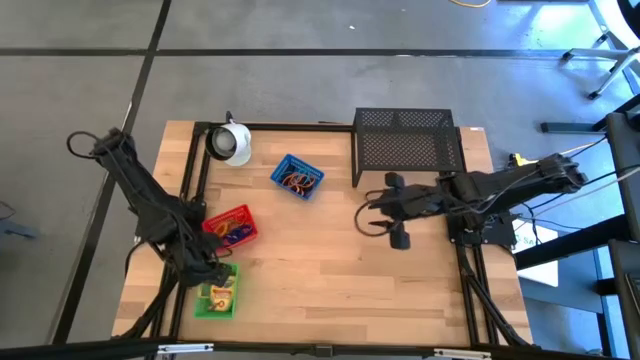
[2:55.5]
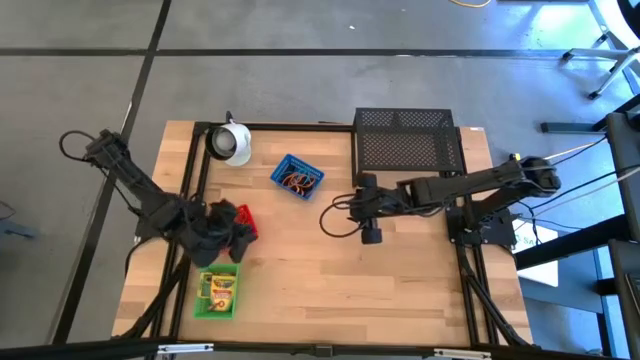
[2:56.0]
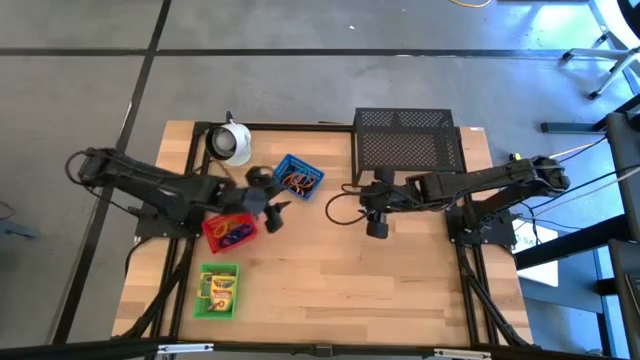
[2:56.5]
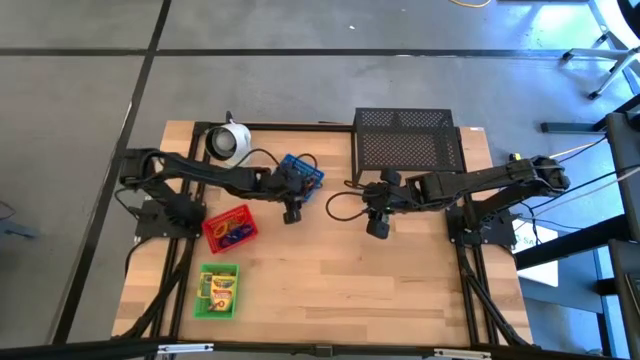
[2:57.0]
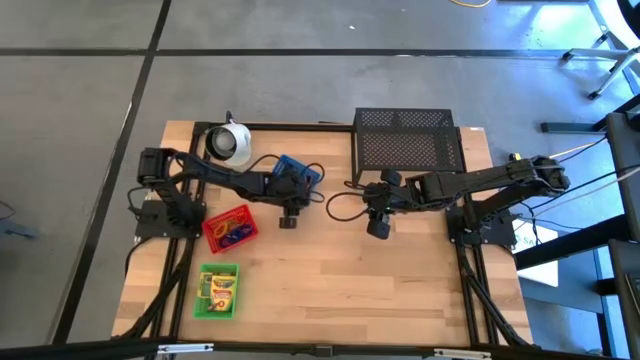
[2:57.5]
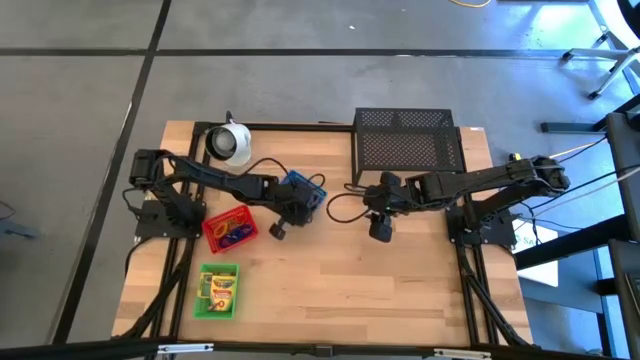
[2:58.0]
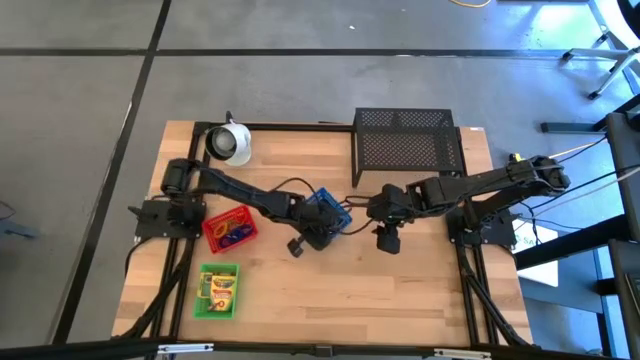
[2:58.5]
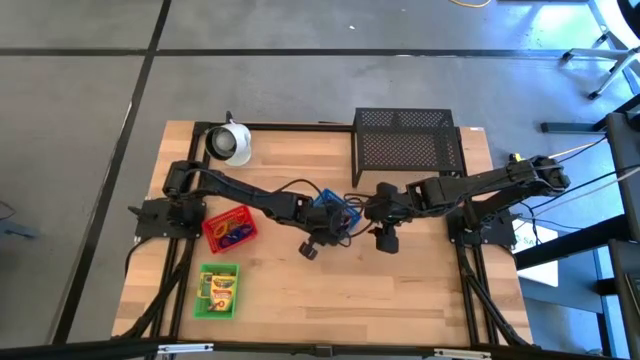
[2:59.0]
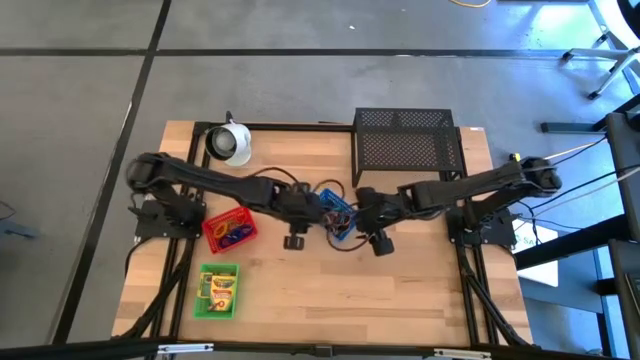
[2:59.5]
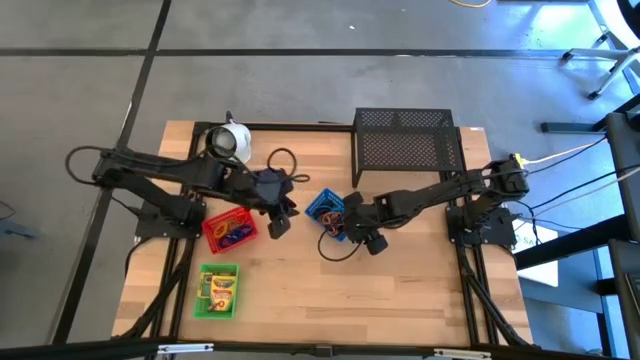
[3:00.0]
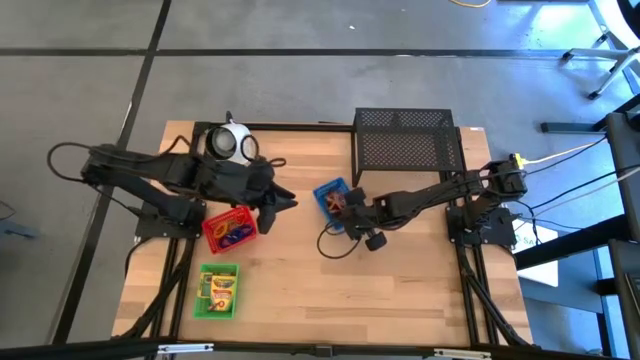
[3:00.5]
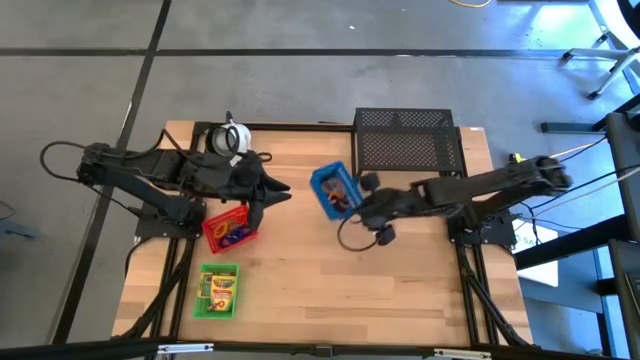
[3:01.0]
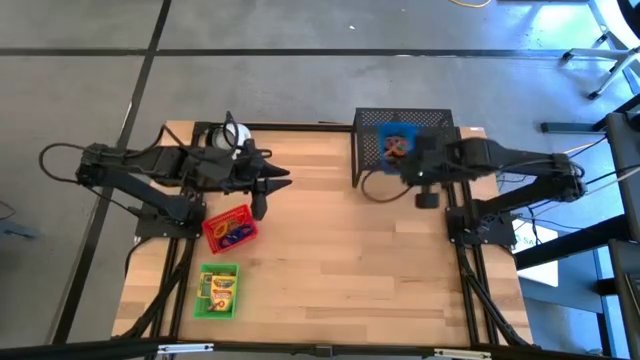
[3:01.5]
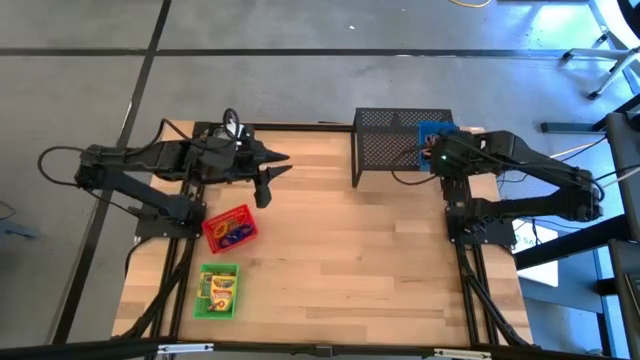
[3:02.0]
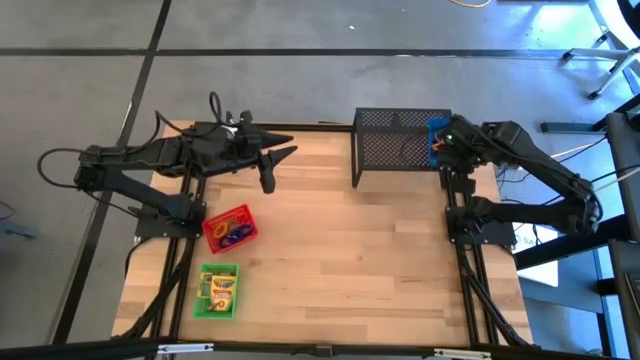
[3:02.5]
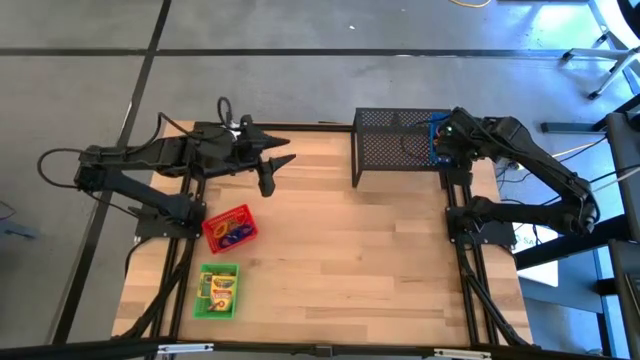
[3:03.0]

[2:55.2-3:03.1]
Task: Pick & Place Office Desk Supplies
Put the blue bin filled with rubber bands on the shelf

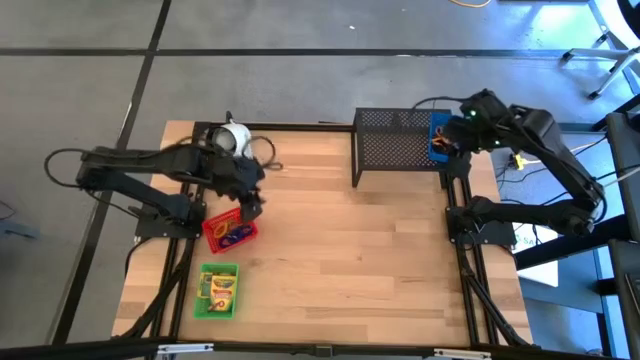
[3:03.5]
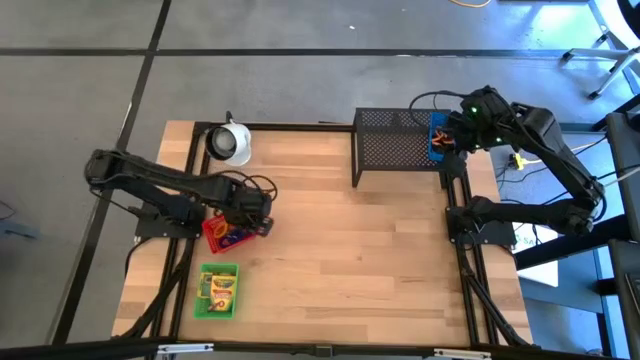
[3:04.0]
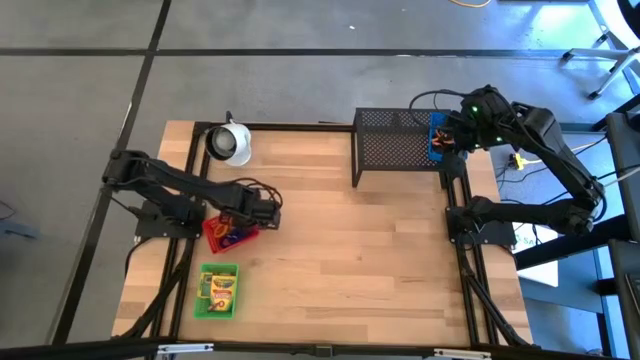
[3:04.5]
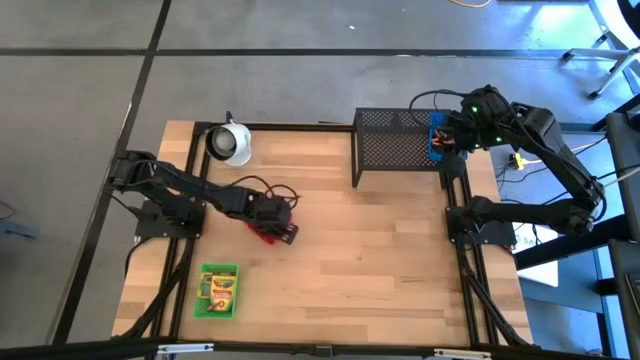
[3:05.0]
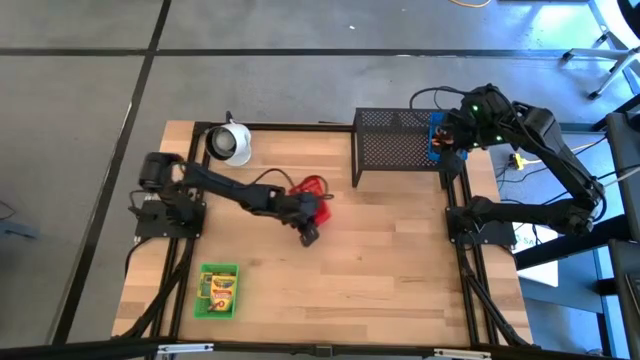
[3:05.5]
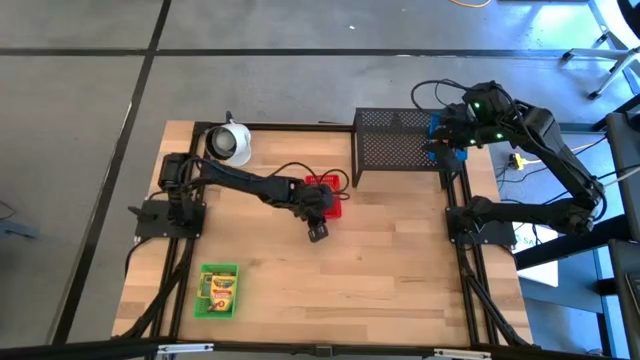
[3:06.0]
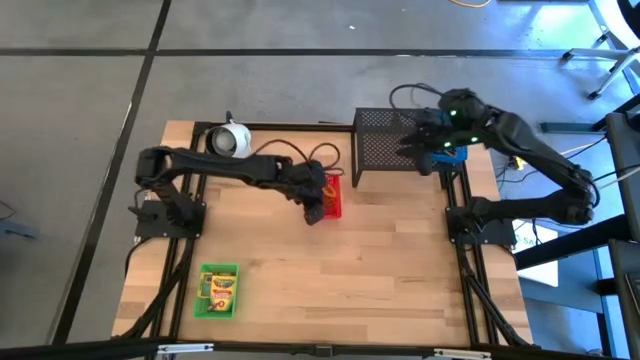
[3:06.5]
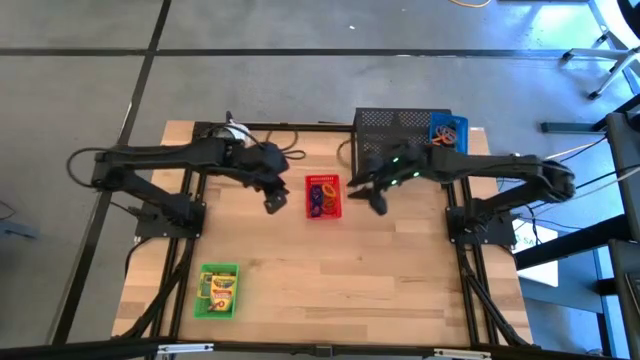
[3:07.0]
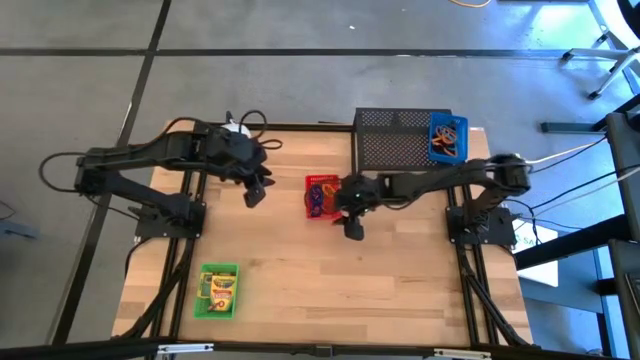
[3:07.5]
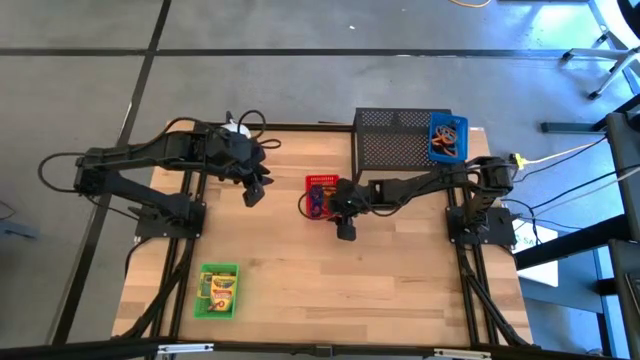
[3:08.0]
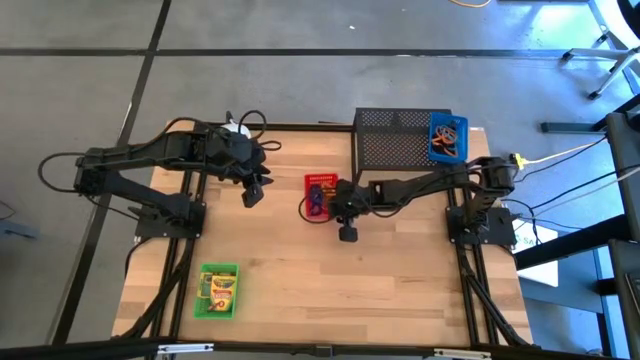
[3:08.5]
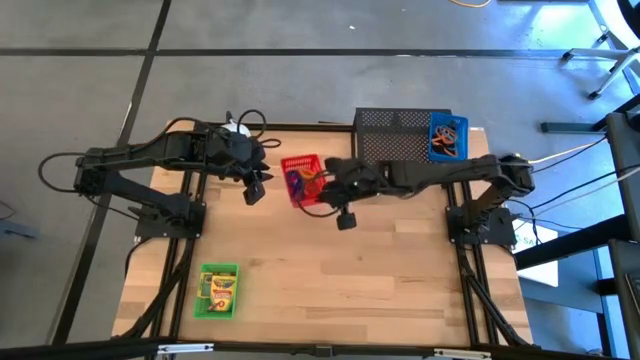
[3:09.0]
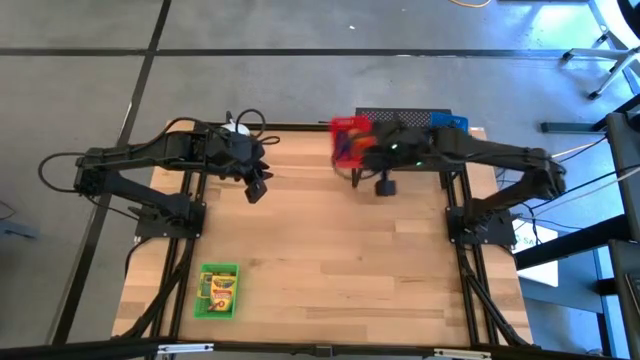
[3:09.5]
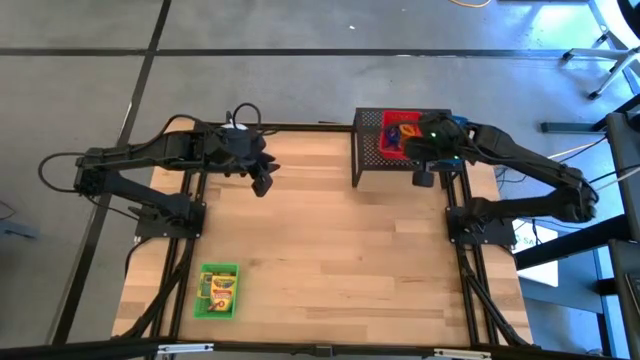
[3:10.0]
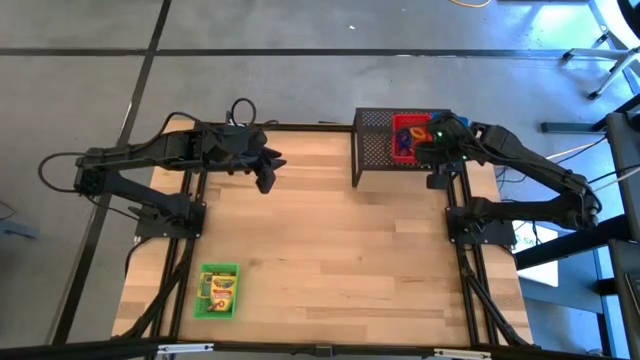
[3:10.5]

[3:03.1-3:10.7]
Put the red bin filled with spring keychains on the shelf

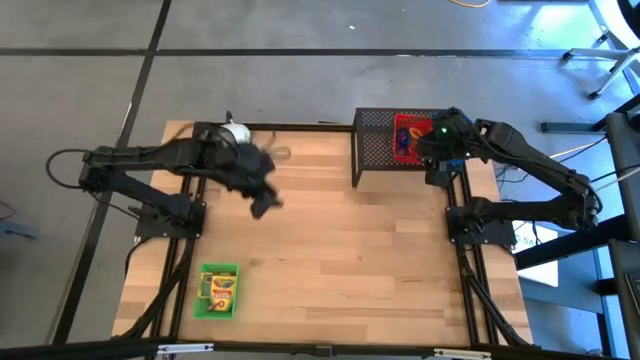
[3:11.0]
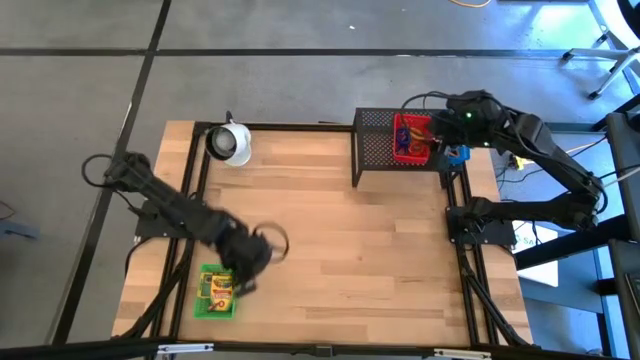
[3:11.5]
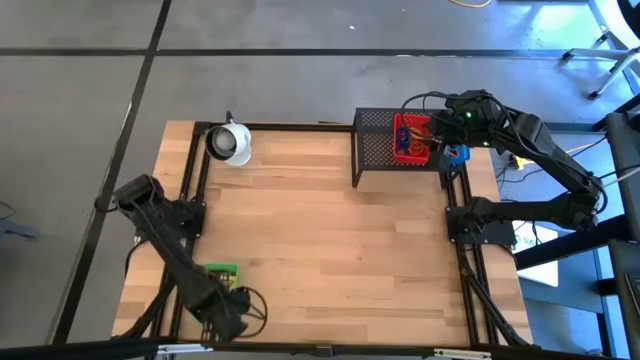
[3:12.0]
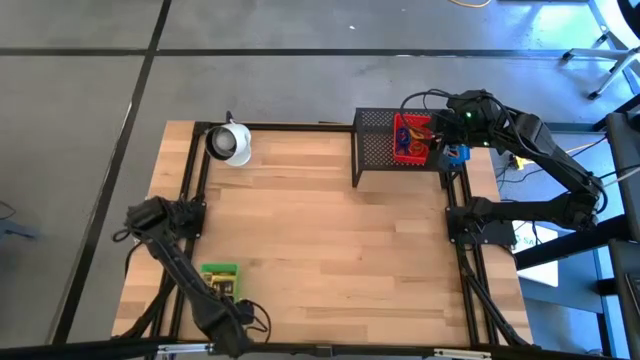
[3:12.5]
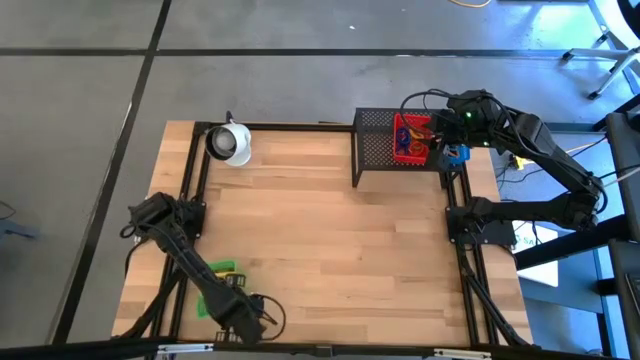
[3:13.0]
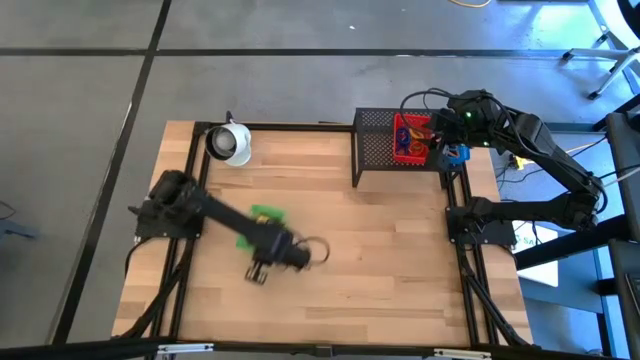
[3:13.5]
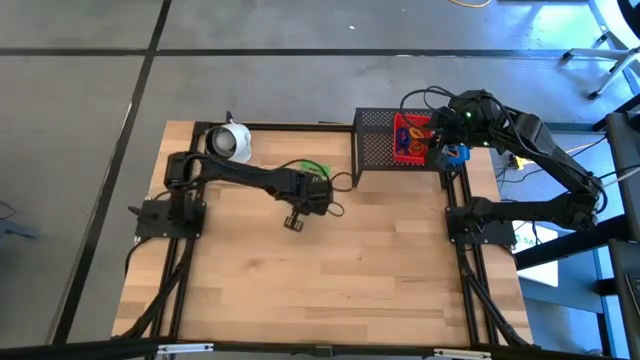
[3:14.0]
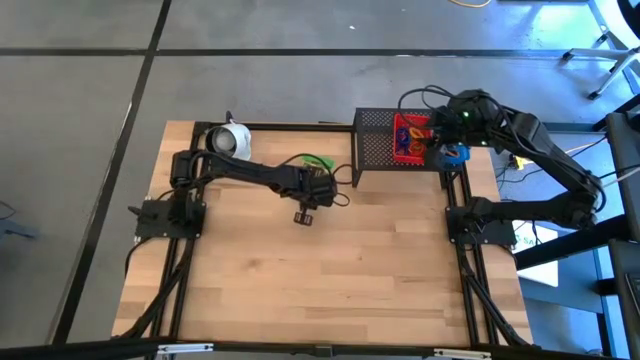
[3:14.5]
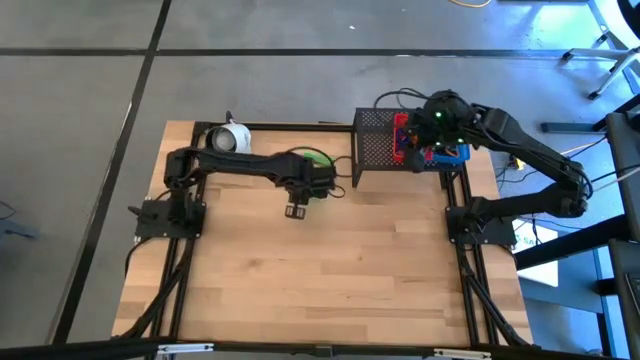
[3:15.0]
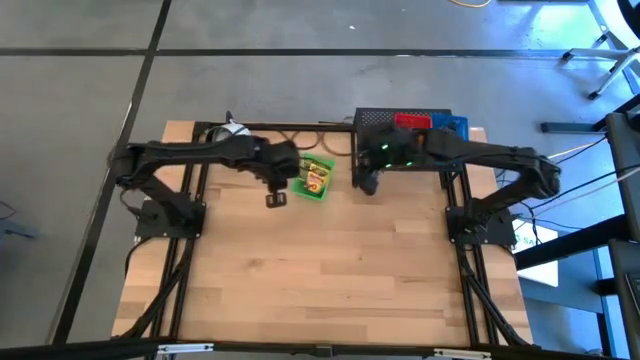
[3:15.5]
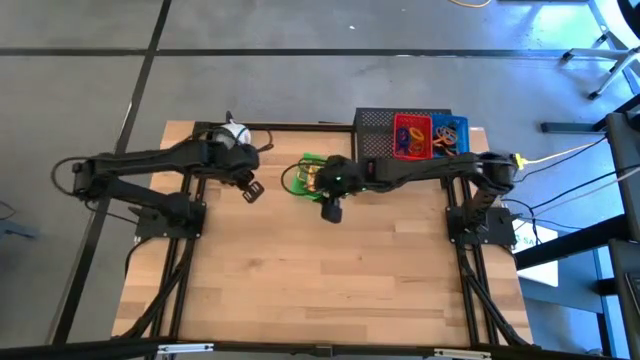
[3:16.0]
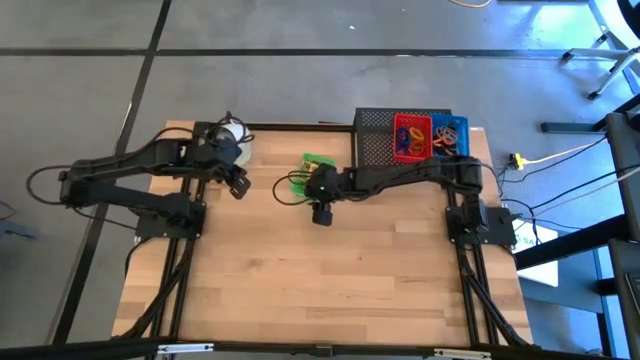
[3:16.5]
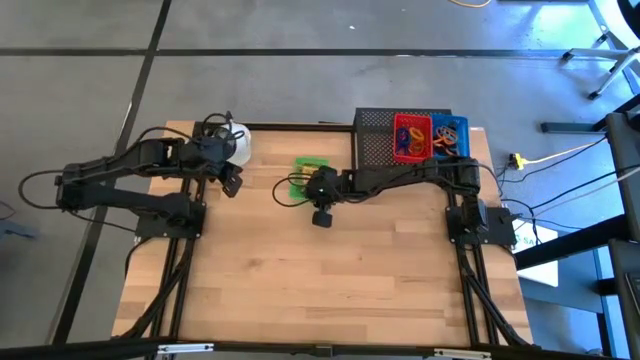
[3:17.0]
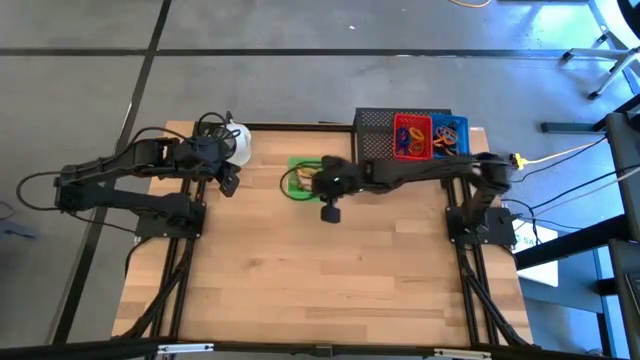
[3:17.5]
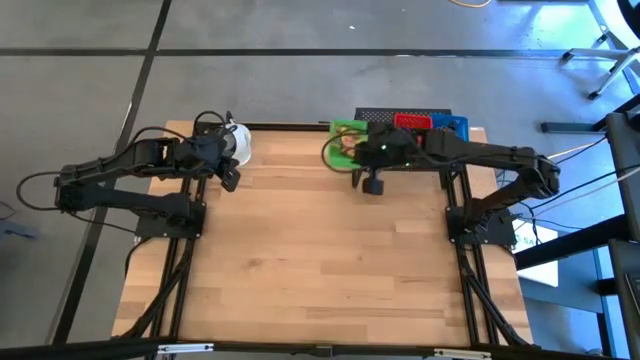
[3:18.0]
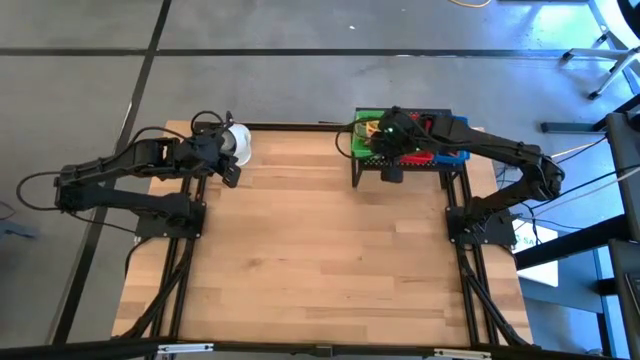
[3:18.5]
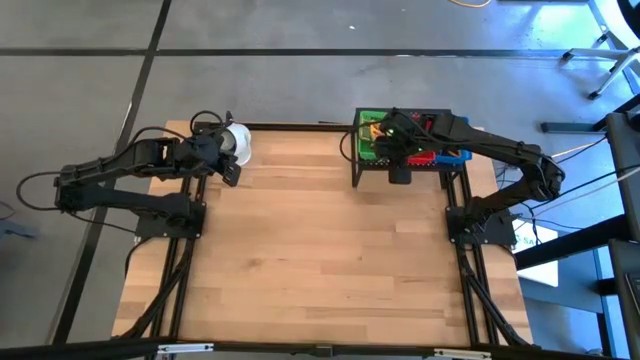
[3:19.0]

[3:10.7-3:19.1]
Put the green bin filled with crayon boxes on the shelf
